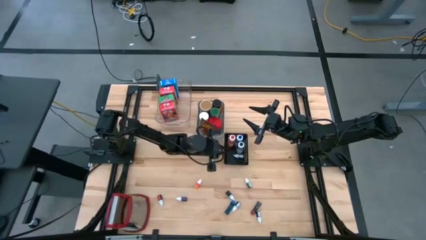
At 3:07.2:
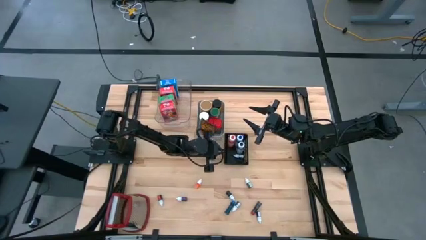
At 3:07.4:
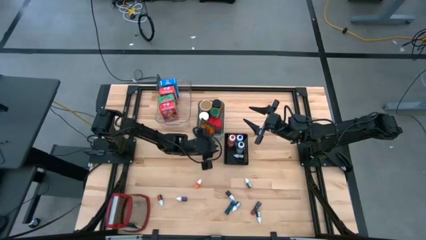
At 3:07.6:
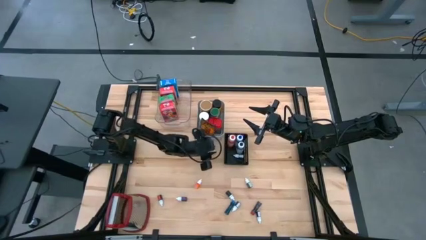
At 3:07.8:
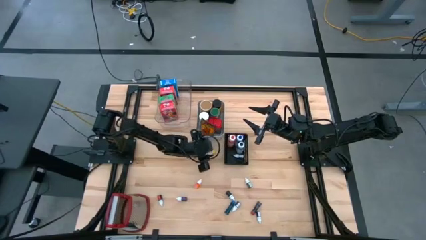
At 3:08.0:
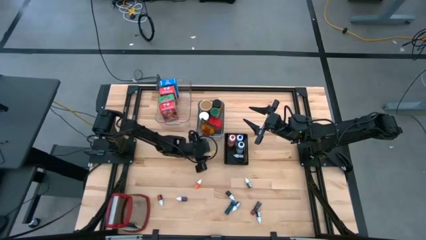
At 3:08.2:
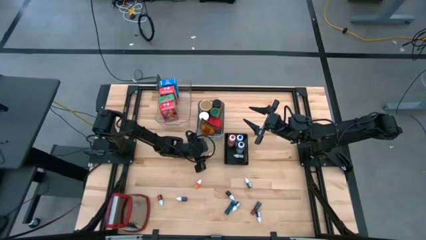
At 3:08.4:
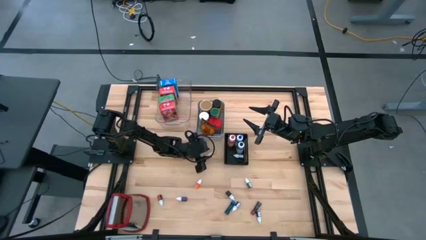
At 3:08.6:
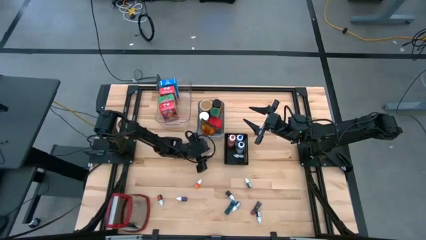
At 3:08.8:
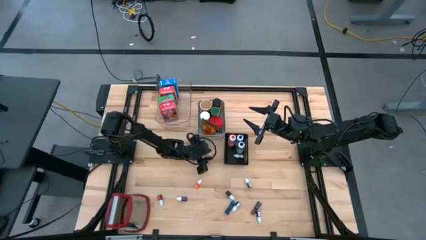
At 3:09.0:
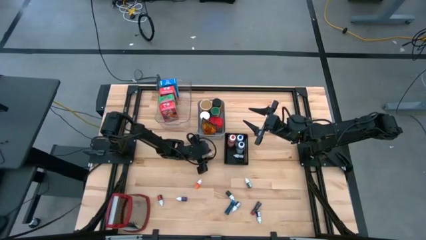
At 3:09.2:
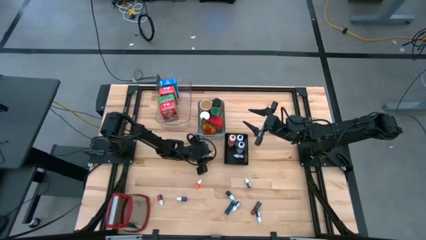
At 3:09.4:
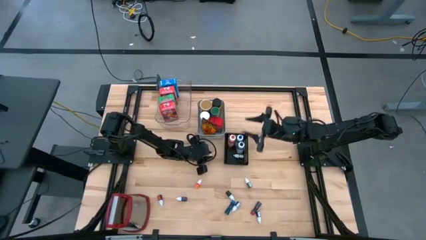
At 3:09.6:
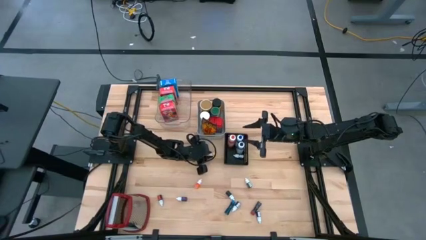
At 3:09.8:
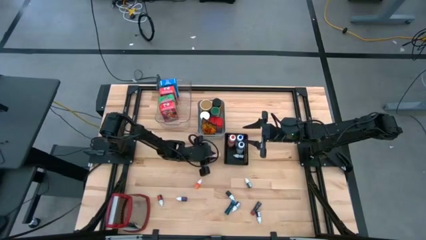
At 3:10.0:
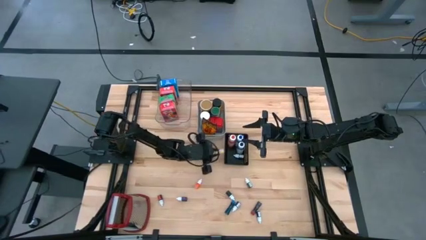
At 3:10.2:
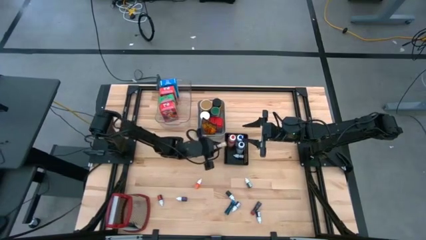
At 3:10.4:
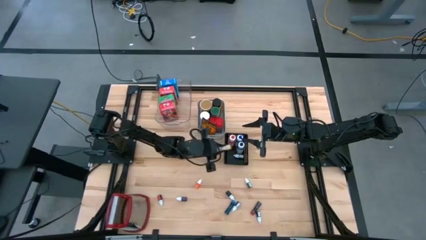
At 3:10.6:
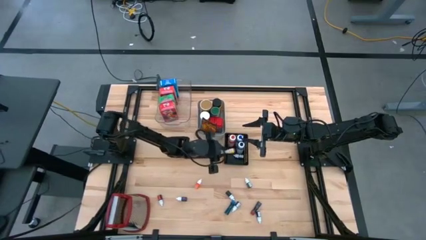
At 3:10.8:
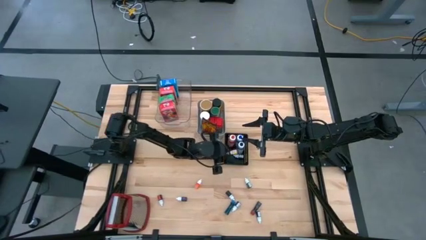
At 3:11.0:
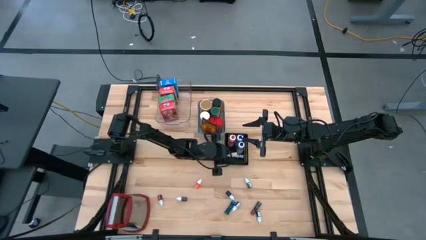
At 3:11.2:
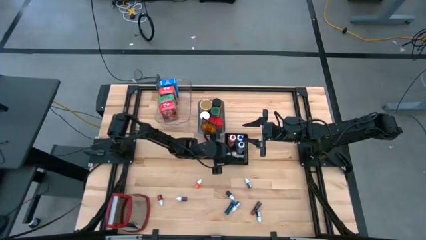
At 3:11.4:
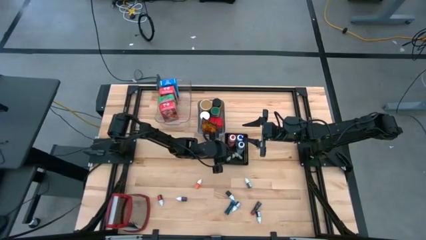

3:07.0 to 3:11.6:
Task: Pick & Place Kitchen Items
Put the top orange food coloring bottle into the black bin

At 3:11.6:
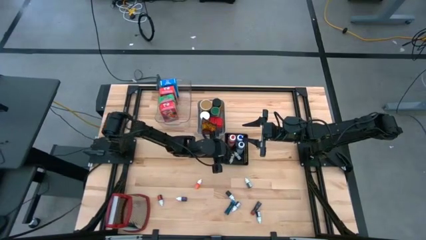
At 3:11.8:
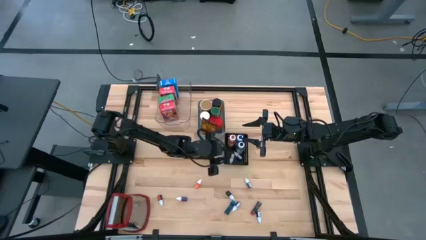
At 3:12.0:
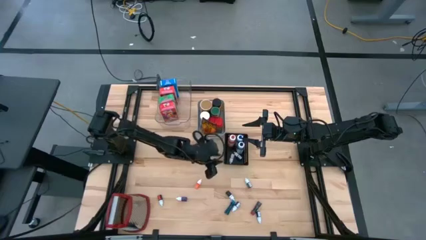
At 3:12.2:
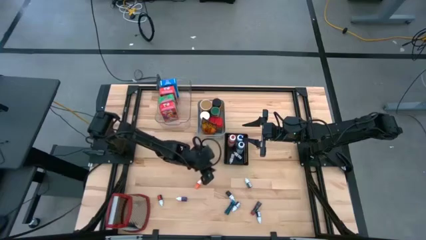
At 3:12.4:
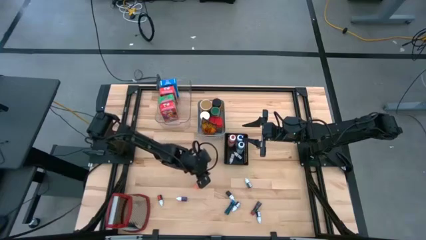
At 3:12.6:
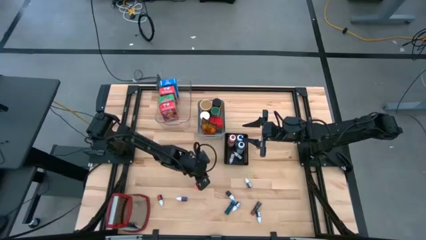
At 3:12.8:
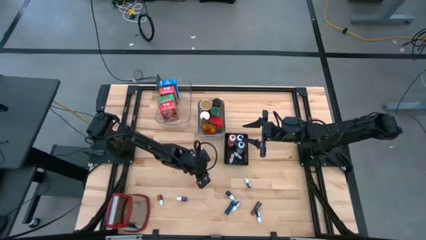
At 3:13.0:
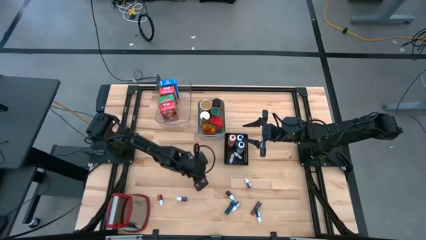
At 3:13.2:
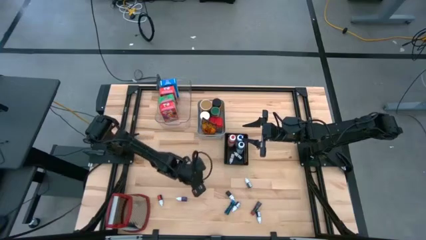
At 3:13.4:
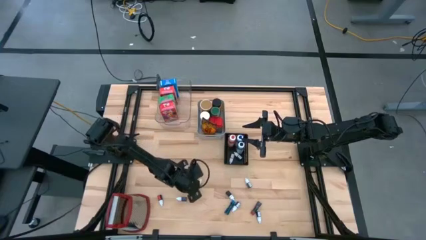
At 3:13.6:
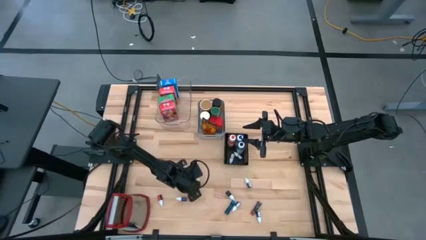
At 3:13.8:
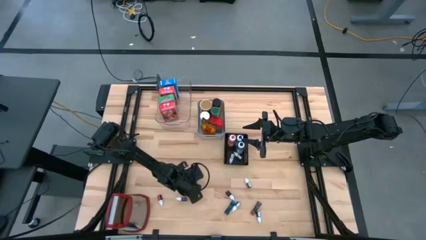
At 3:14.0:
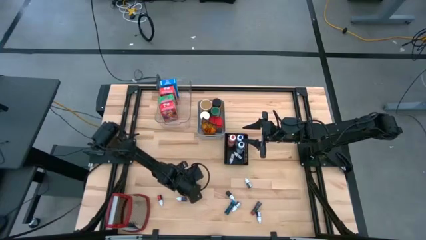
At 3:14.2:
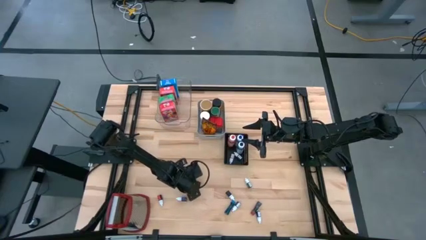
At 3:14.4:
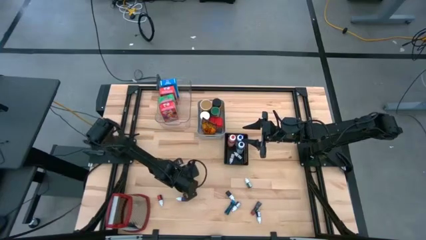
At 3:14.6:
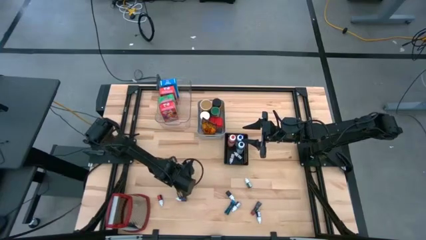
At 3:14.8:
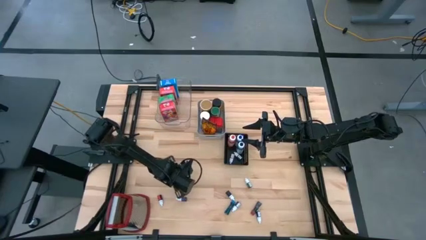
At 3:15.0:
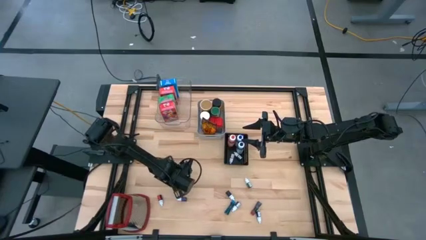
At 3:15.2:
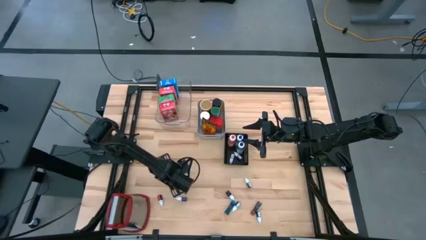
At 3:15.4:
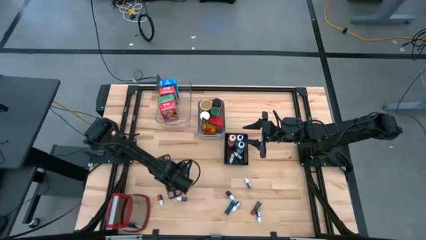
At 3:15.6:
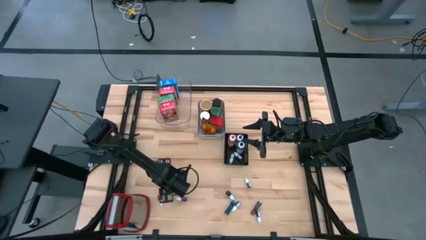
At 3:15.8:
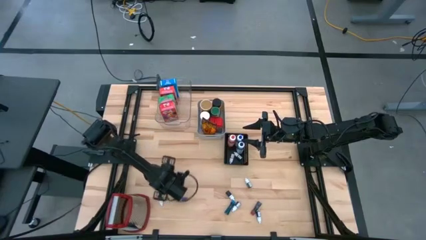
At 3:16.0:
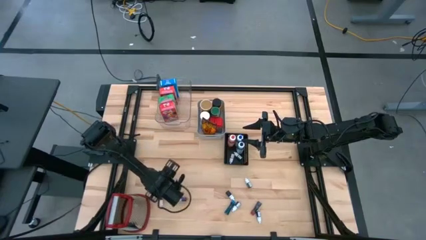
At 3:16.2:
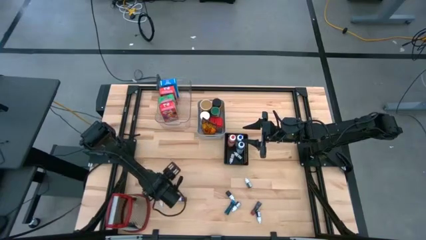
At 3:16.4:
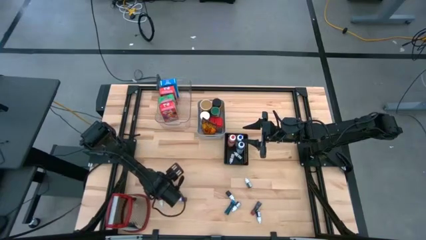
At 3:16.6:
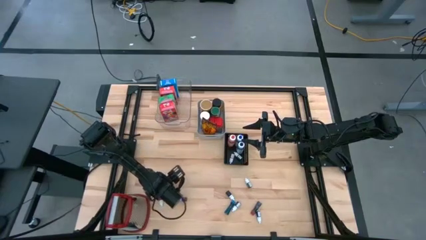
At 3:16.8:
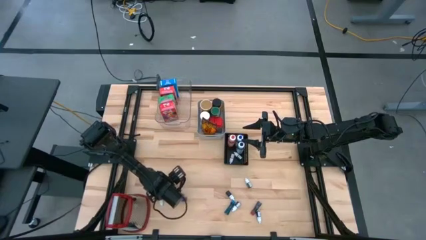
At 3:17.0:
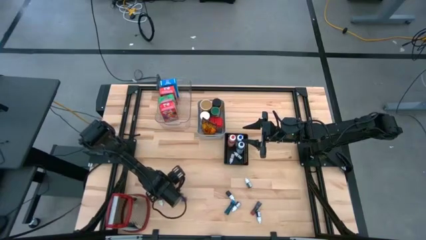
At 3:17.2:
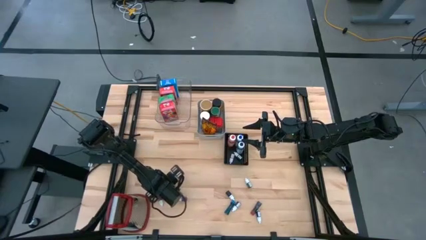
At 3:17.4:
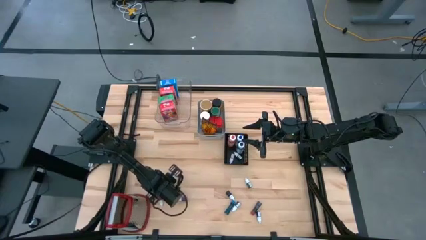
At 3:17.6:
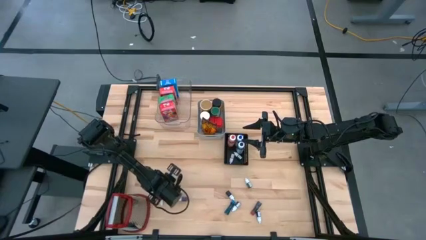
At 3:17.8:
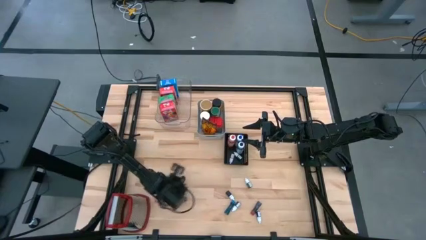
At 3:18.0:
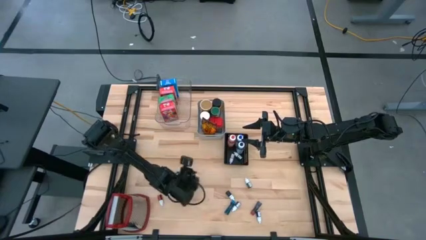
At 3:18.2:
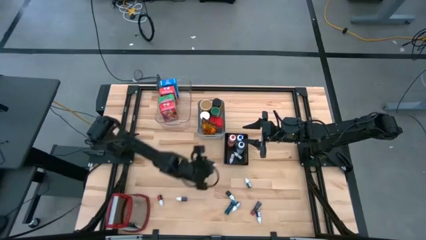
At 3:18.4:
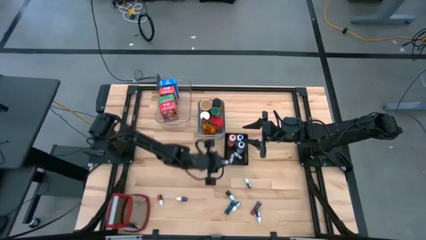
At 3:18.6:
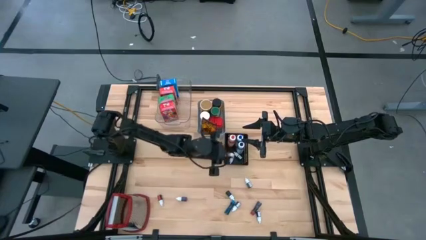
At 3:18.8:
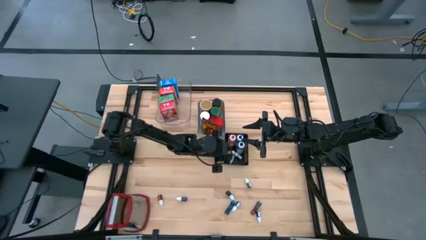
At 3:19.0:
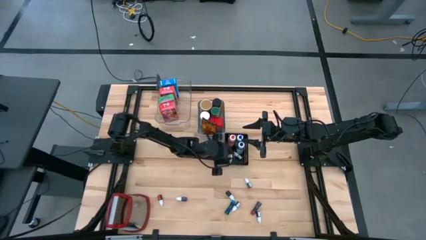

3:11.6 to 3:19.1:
Put the orange food coloring bottle into the black bin

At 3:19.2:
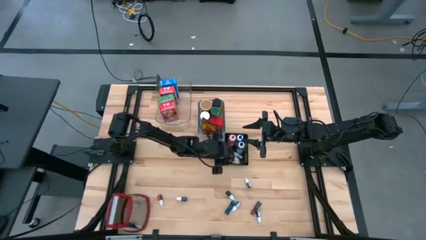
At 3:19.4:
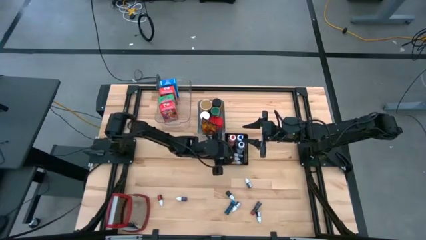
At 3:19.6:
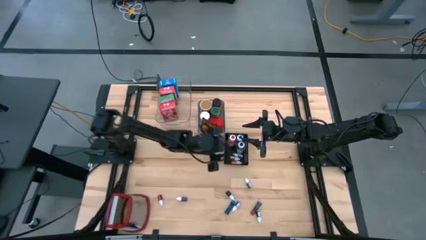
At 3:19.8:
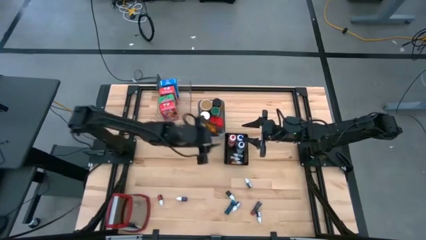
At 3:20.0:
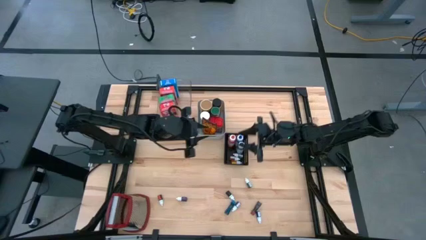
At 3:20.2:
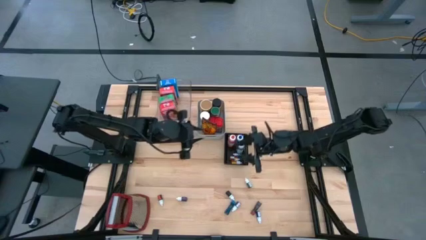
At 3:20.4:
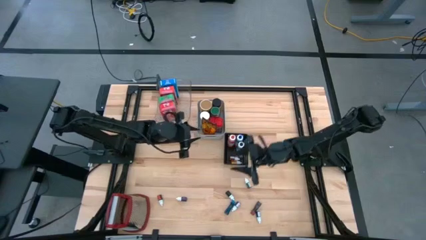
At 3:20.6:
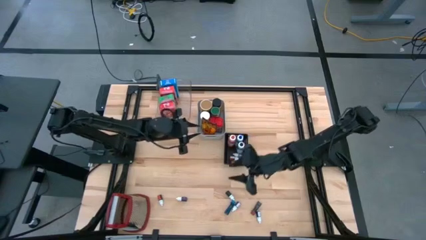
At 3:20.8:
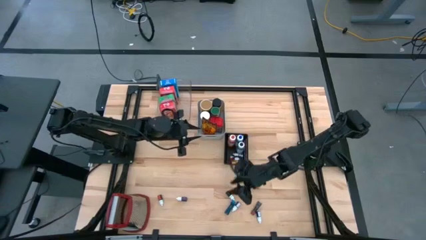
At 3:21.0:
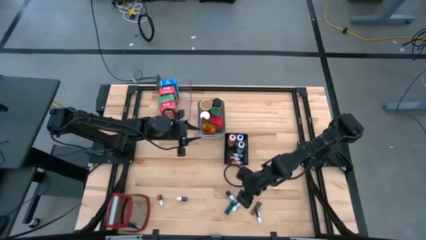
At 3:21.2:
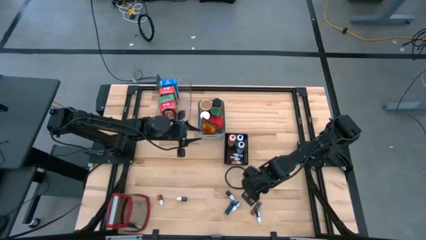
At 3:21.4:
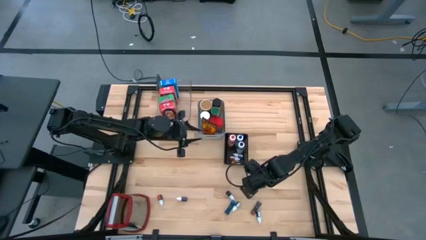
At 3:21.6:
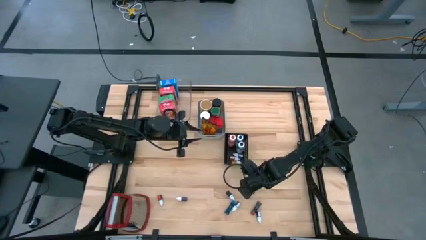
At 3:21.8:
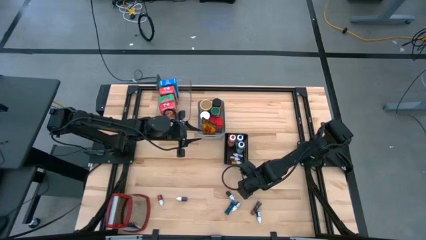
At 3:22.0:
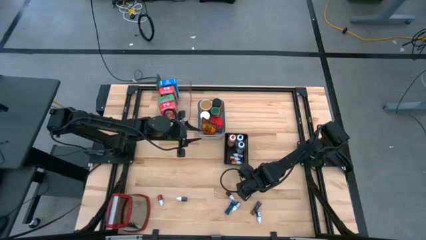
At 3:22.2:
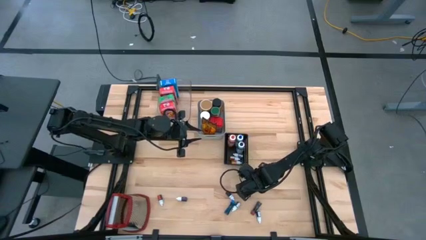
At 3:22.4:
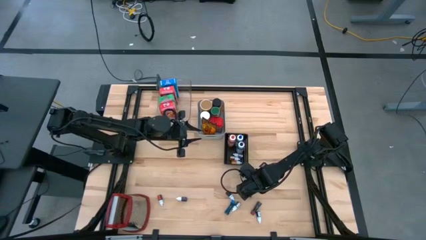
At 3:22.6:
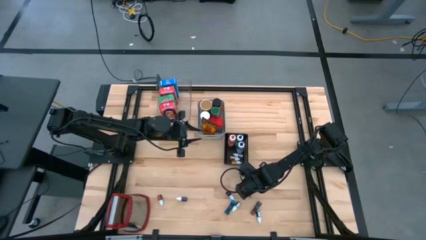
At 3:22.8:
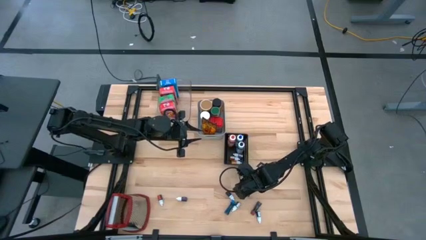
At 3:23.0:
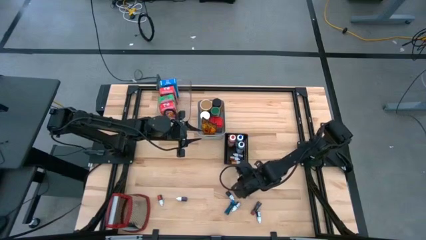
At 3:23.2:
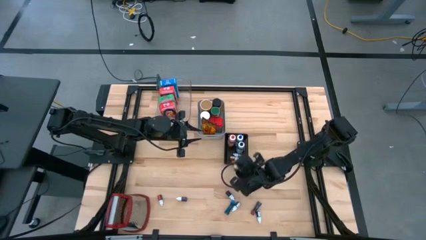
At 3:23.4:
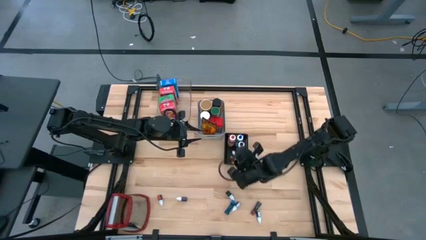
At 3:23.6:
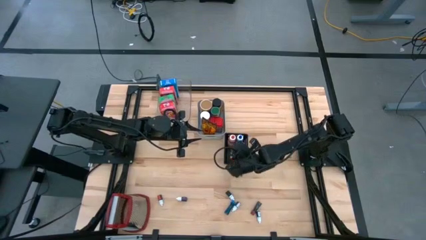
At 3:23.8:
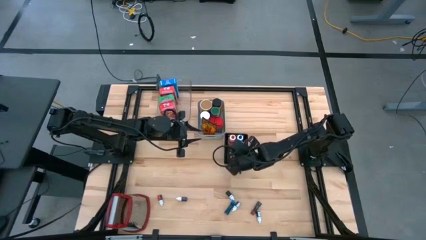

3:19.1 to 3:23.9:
Put the dark green food coloring bottle into the black bin
